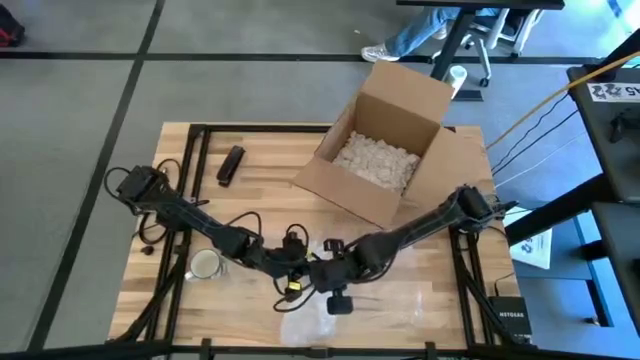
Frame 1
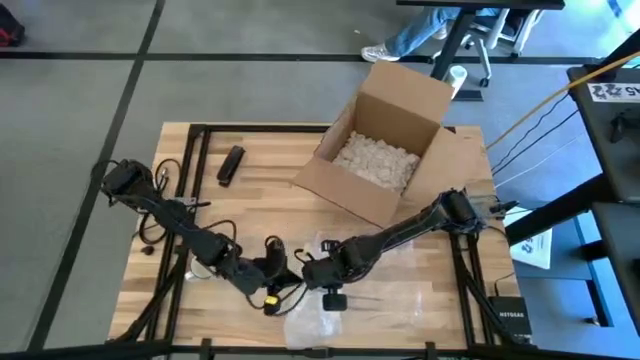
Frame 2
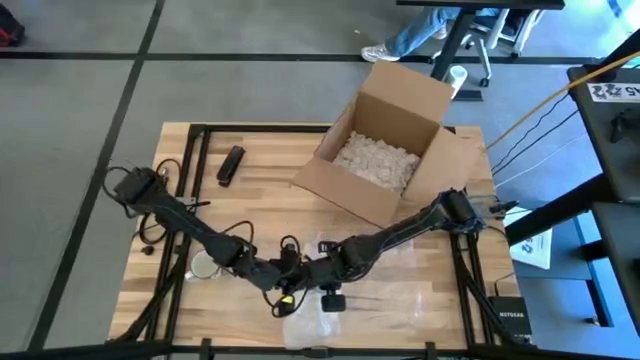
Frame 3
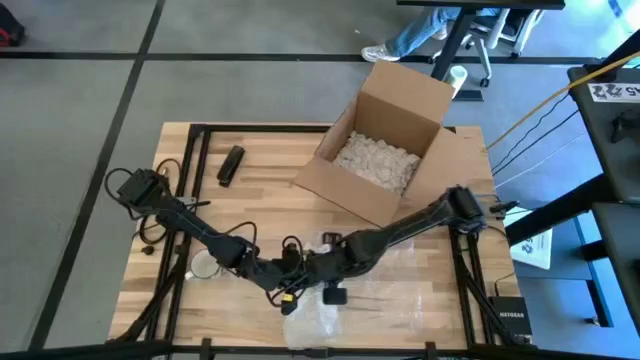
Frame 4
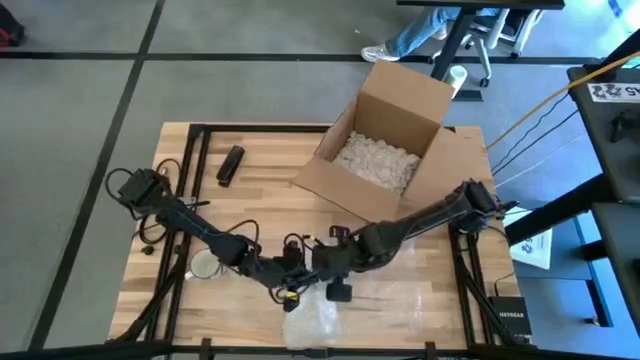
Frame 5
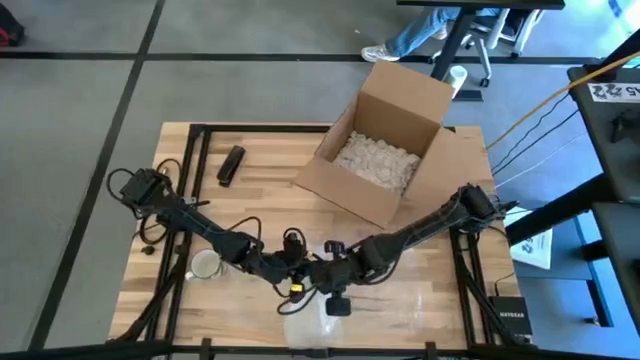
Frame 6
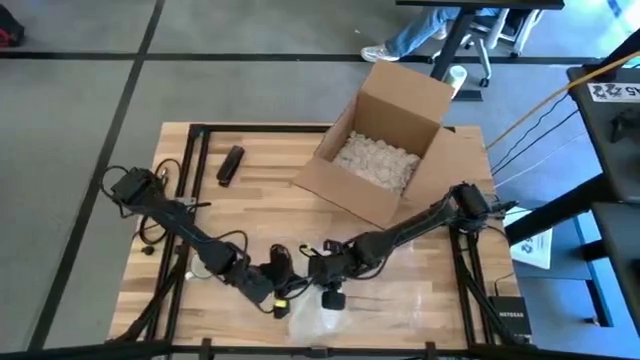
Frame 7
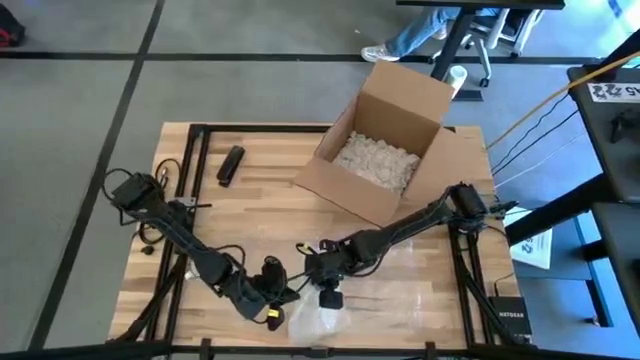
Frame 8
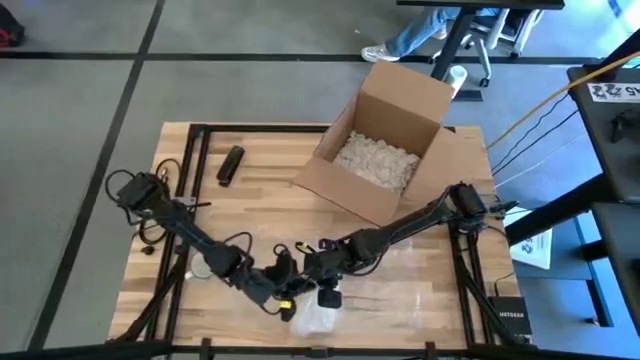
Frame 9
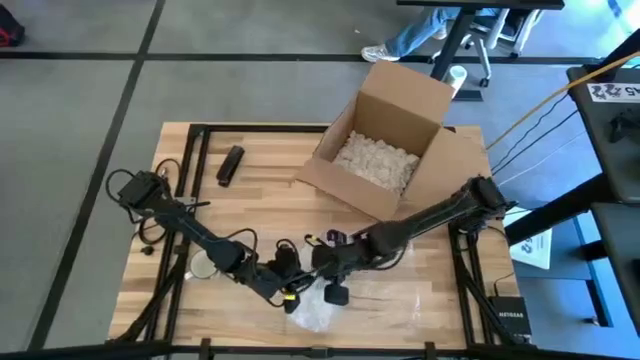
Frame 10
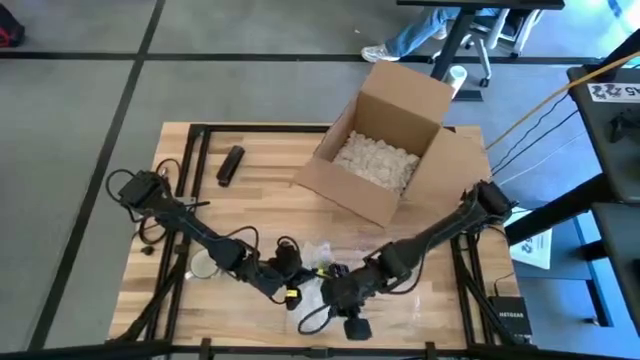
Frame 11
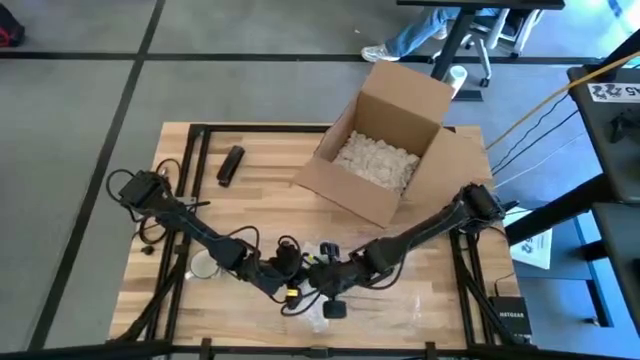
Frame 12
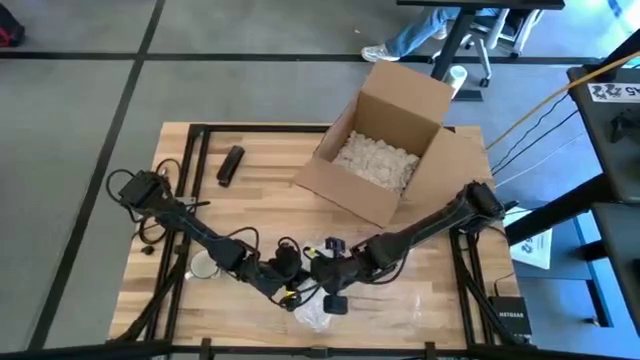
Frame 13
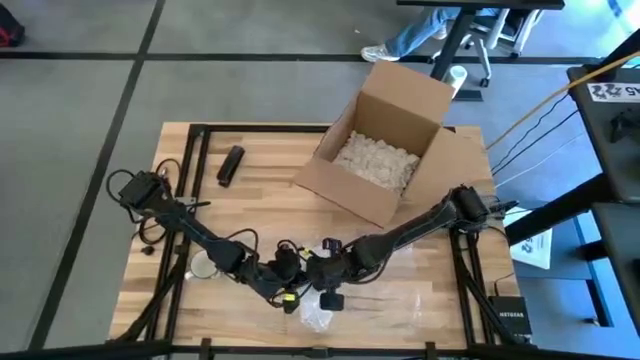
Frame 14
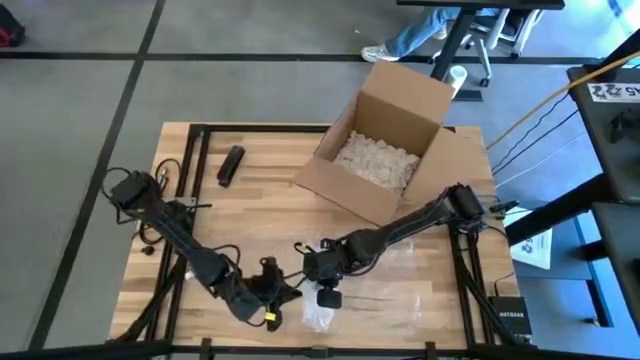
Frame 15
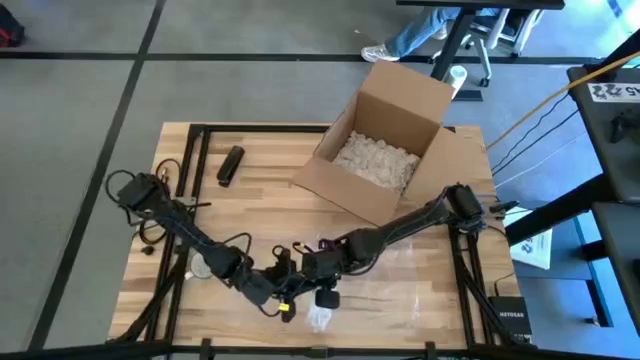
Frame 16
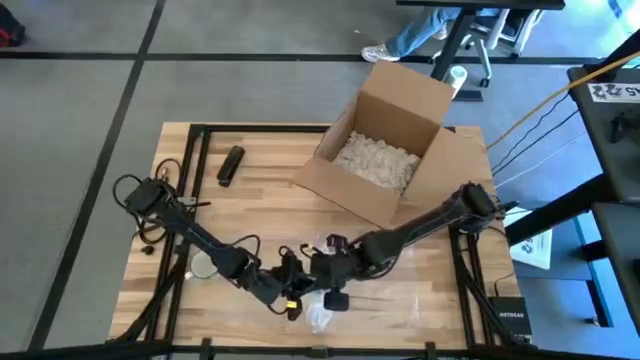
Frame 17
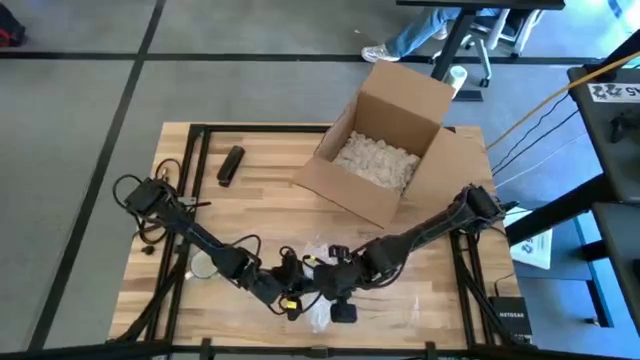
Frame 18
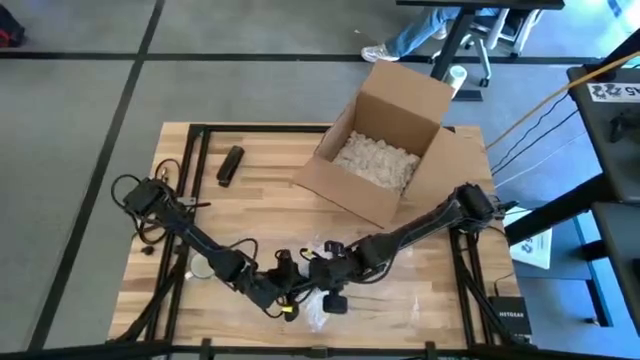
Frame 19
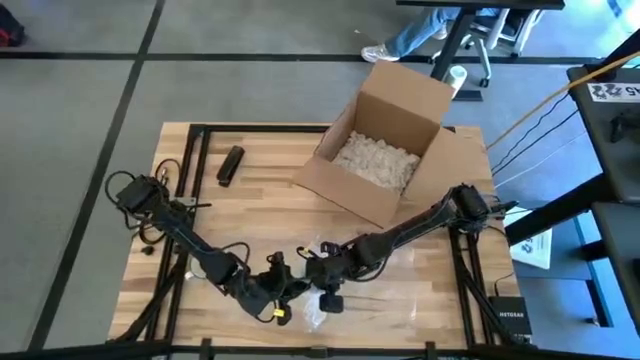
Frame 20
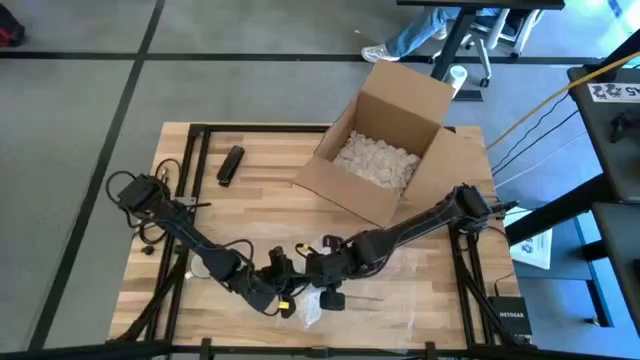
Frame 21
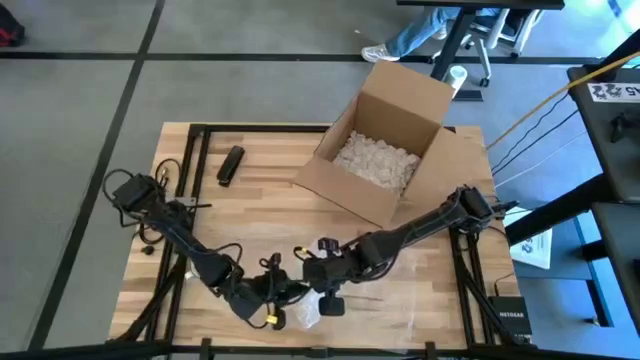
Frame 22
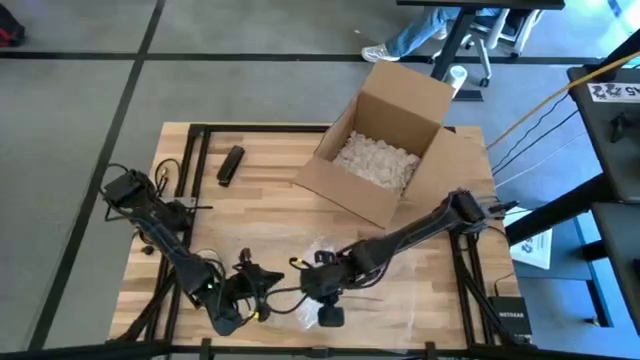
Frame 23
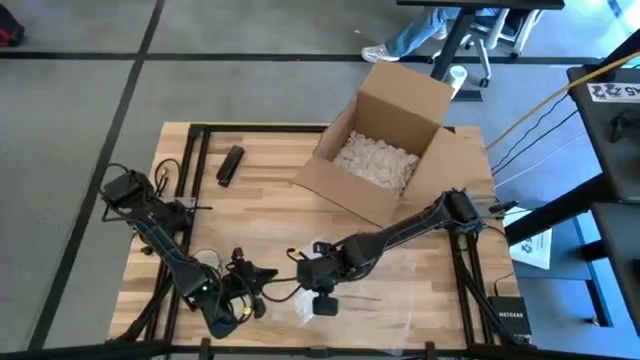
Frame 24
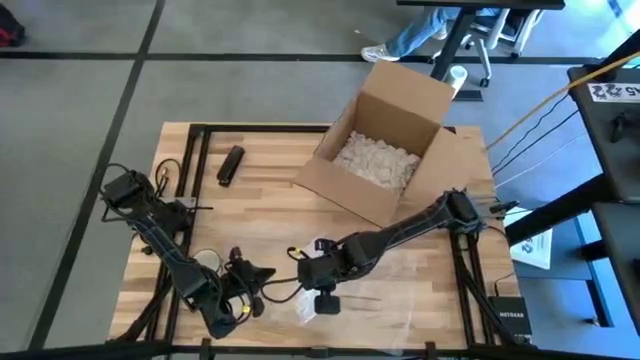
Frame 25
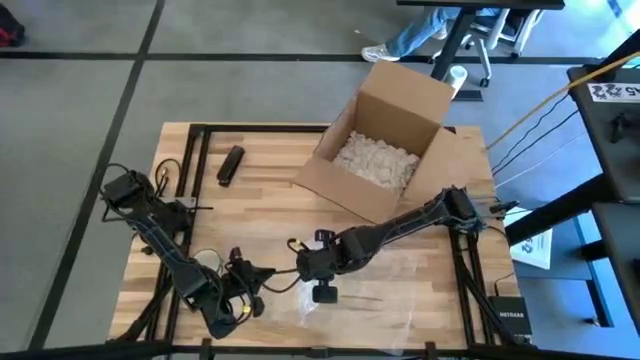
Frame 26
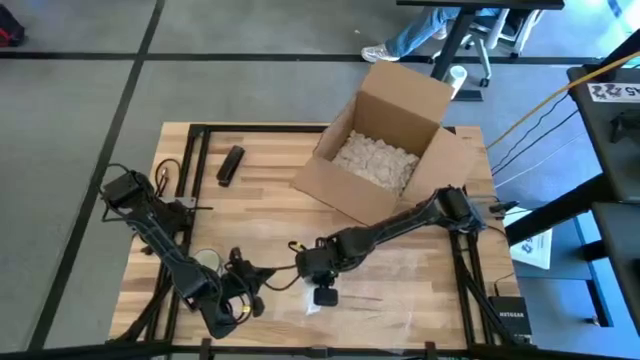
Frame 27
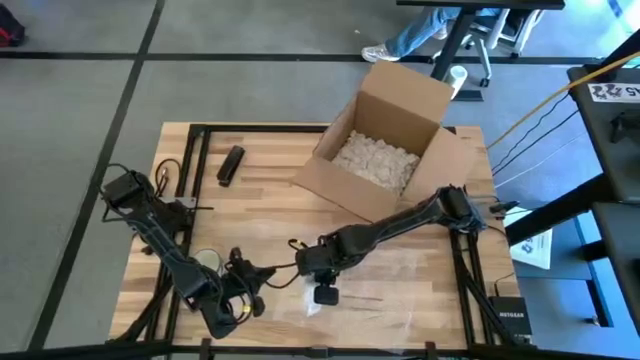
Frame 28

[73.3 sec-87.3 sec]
Task: wrap mug
Wrap the green mug with bubble wrap

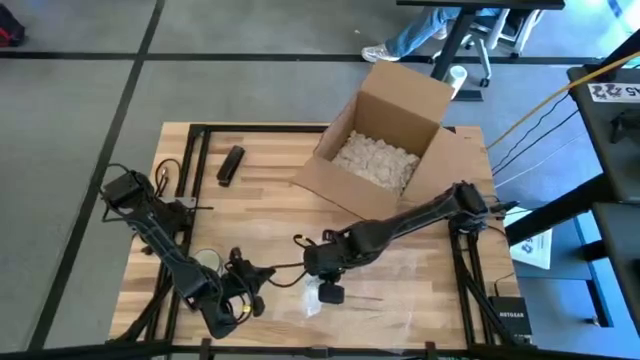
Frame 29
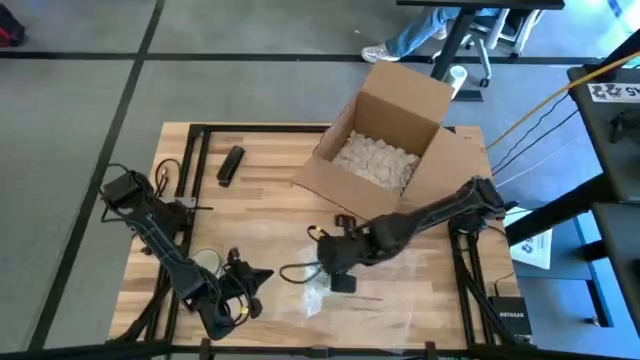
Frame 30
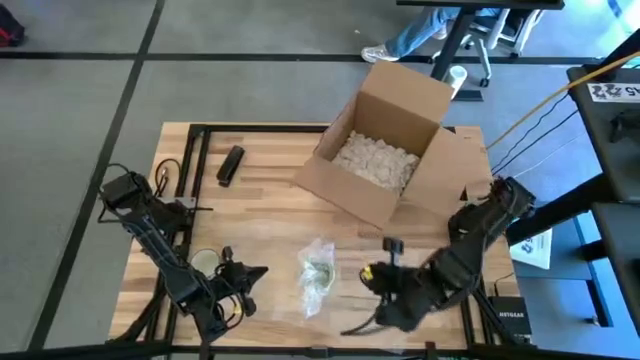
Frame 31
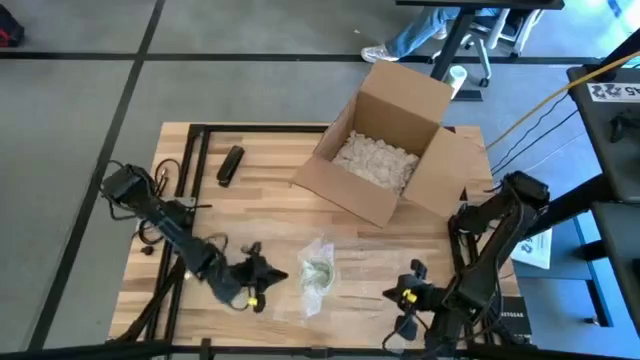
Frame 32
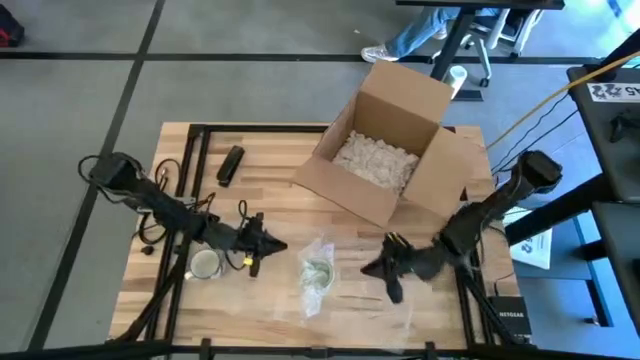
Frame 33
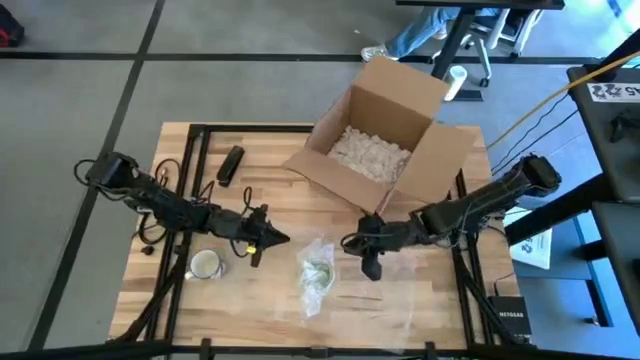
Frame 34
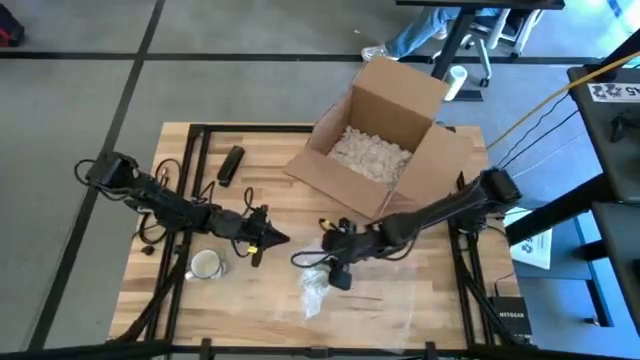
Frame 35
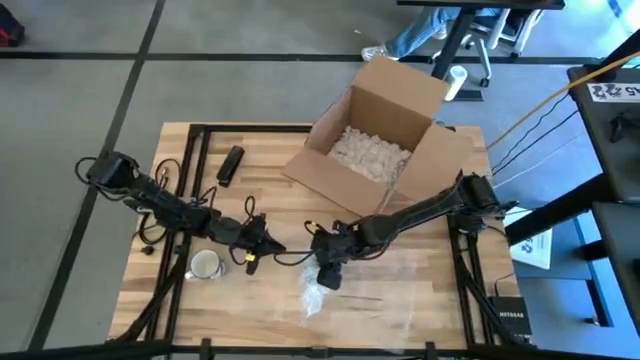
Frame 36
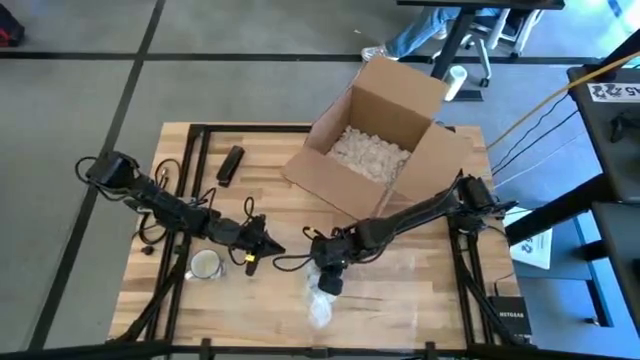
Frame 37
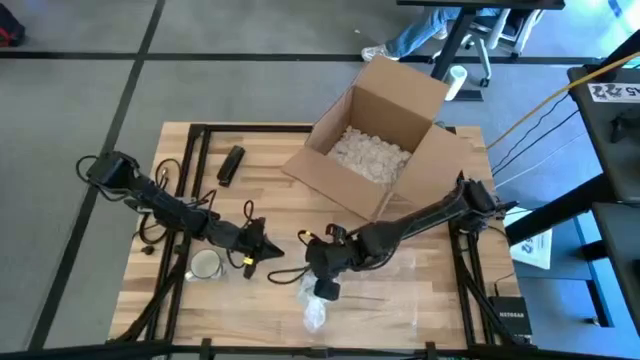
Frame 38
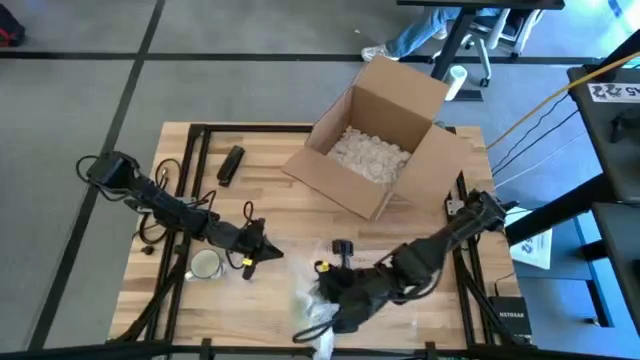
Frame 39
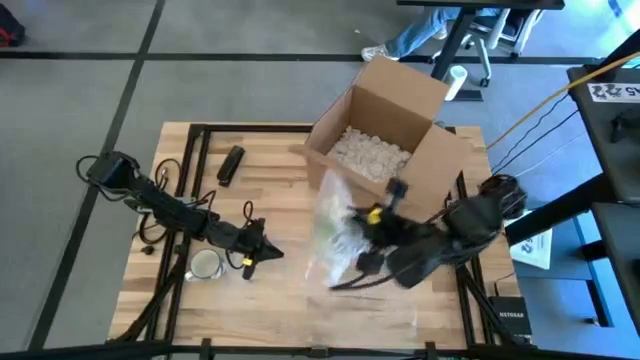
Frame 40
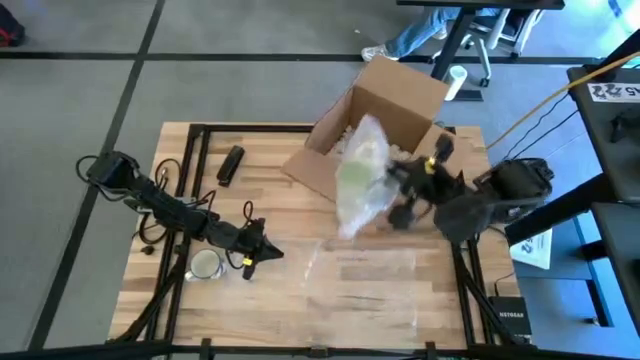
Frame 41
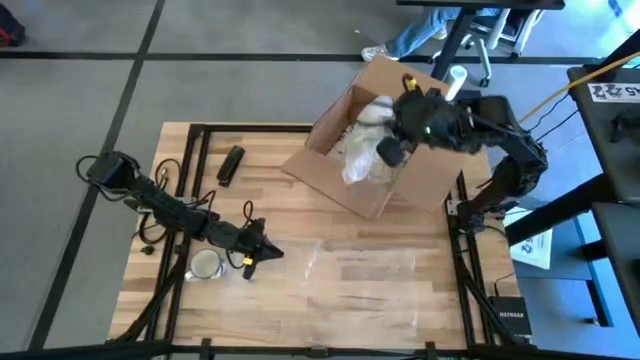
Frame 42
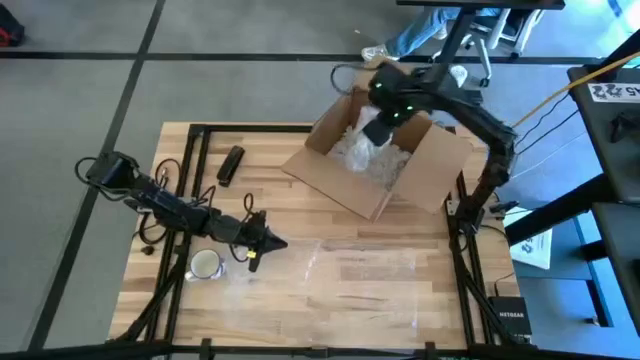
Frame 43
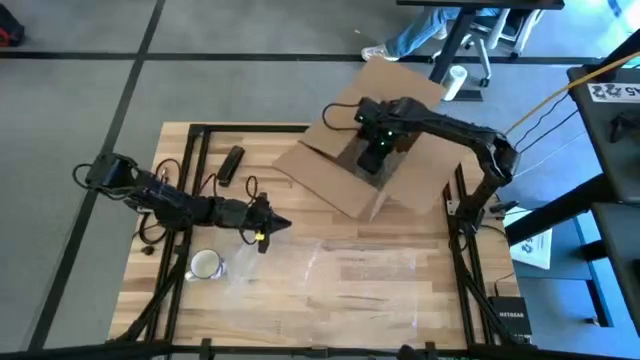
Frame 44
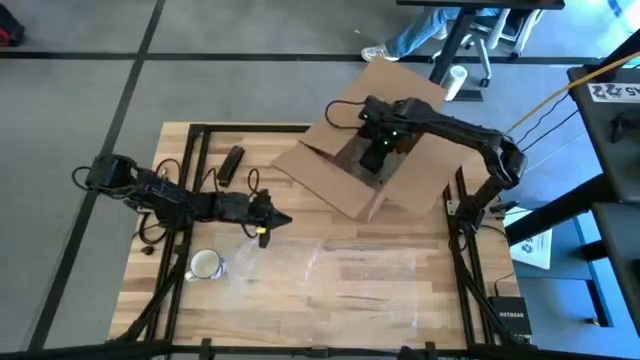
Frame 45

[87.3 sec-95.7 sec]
Put the wrapped green mug into the cardboard box
